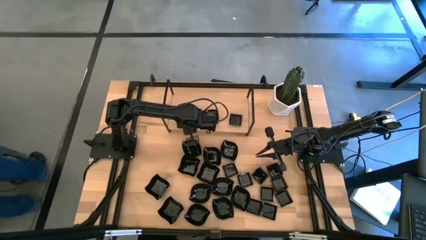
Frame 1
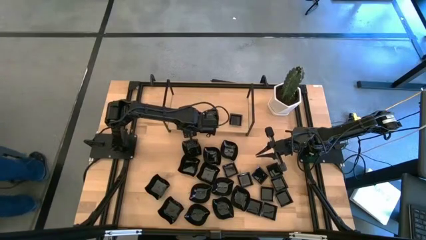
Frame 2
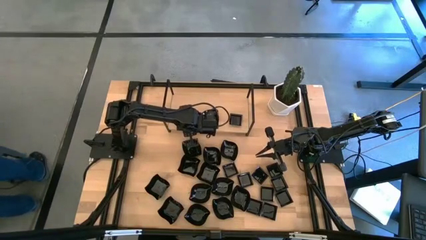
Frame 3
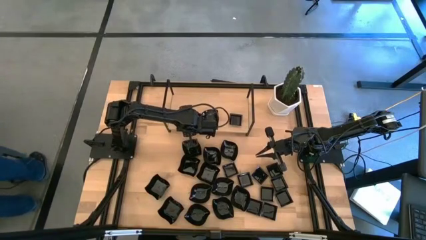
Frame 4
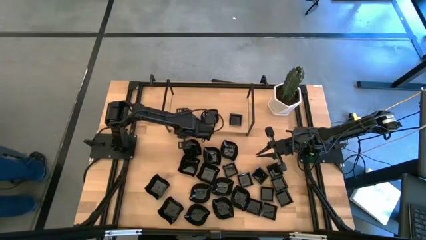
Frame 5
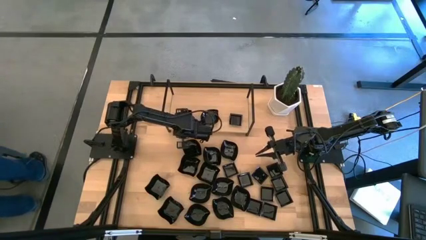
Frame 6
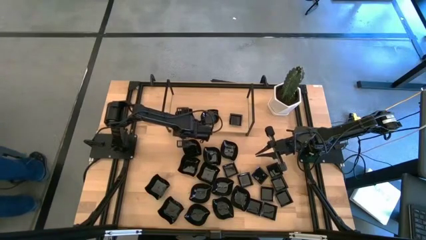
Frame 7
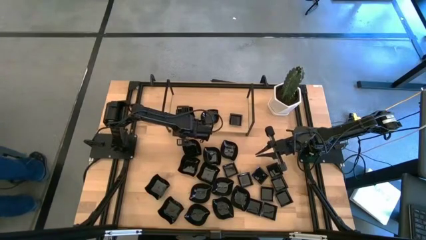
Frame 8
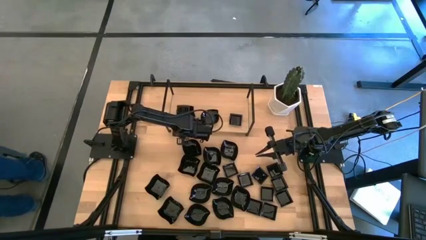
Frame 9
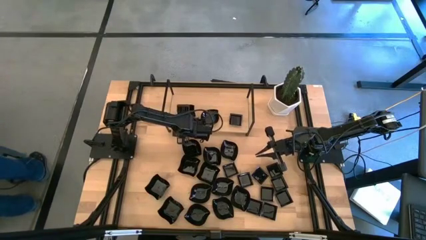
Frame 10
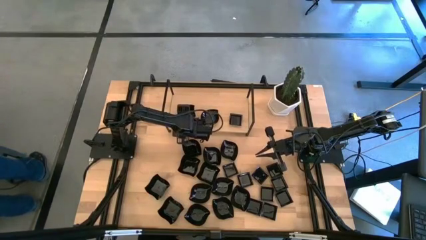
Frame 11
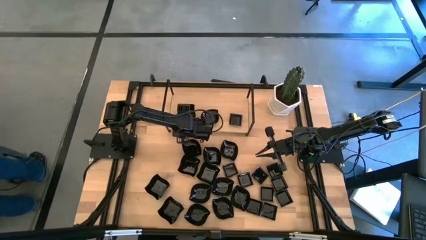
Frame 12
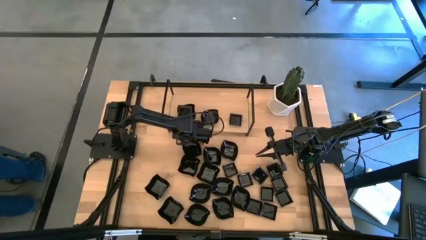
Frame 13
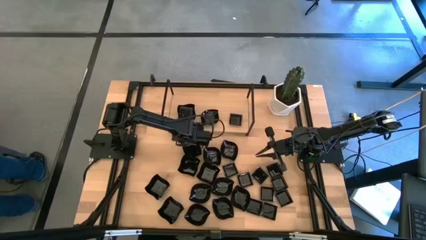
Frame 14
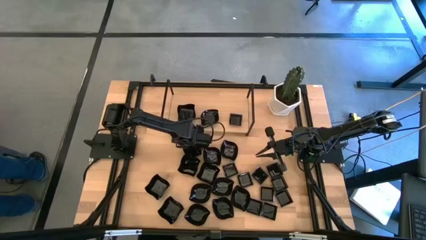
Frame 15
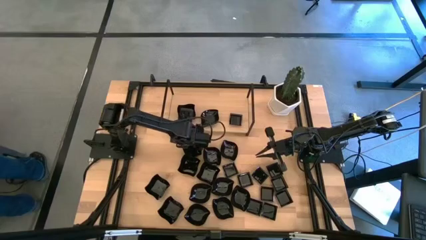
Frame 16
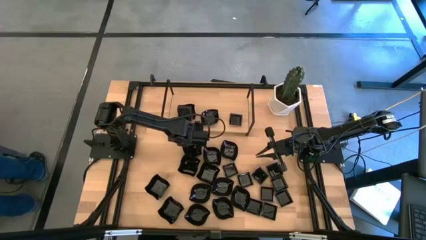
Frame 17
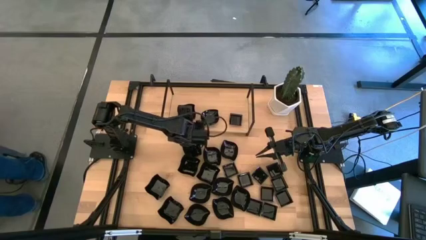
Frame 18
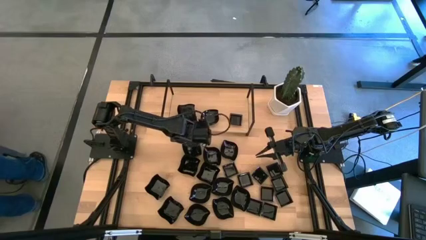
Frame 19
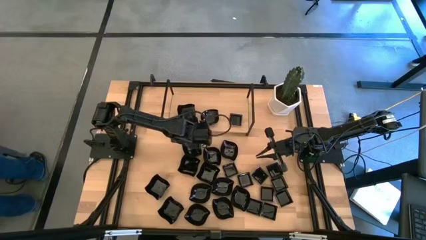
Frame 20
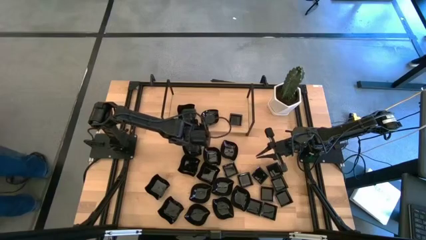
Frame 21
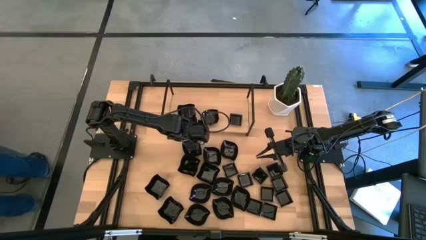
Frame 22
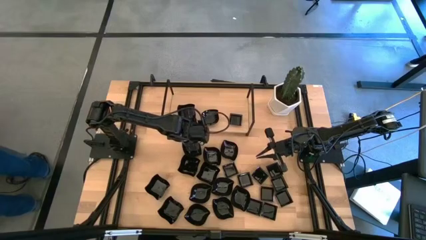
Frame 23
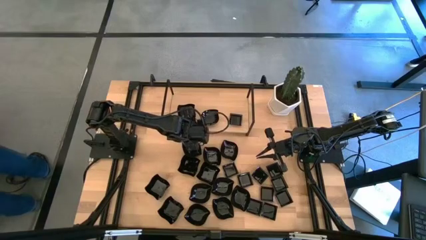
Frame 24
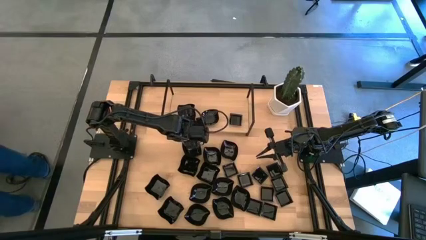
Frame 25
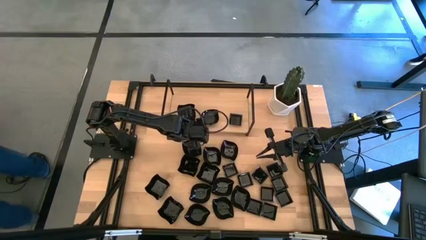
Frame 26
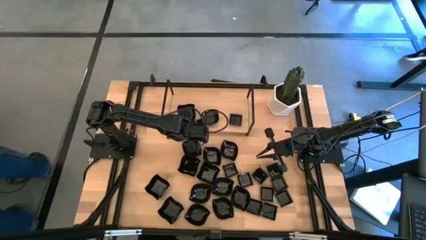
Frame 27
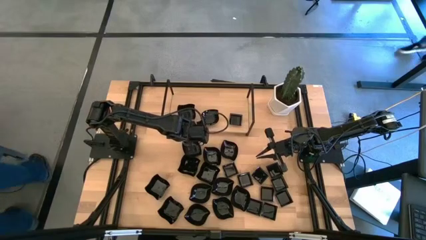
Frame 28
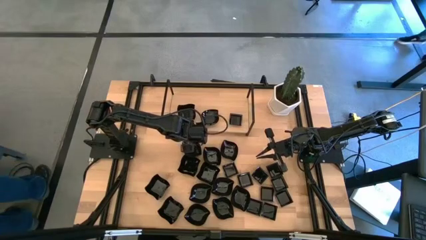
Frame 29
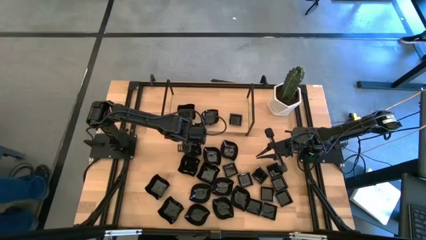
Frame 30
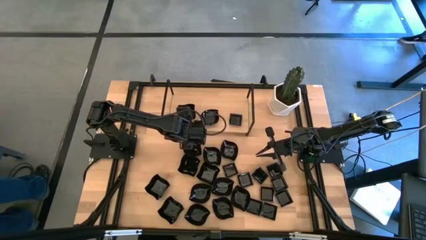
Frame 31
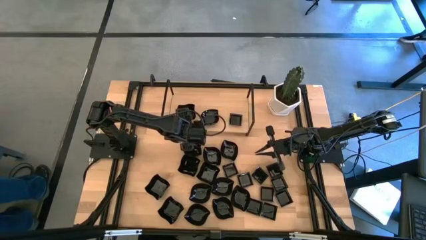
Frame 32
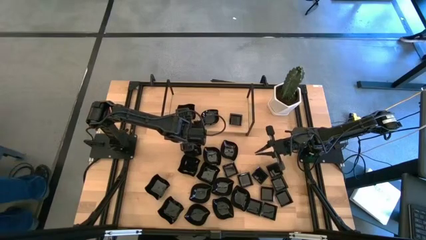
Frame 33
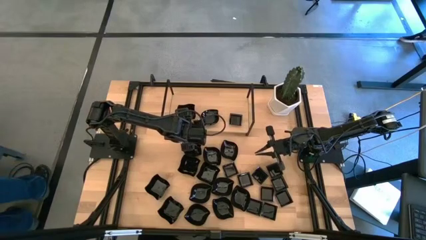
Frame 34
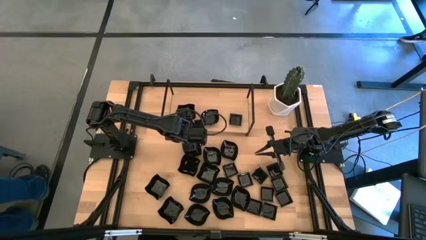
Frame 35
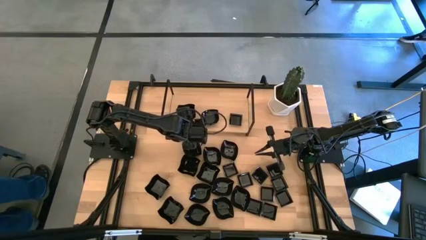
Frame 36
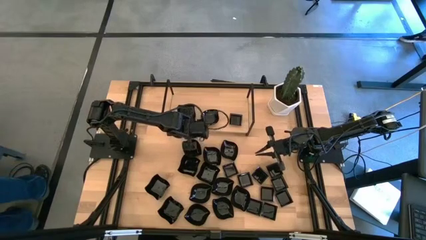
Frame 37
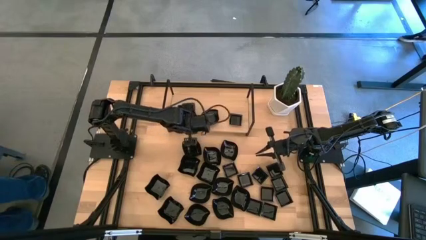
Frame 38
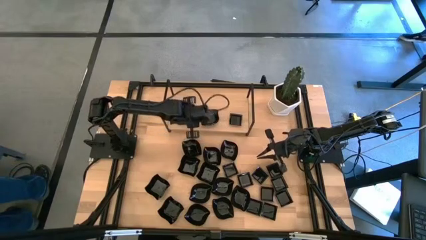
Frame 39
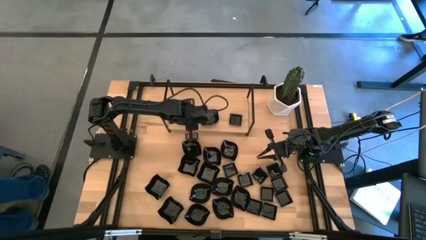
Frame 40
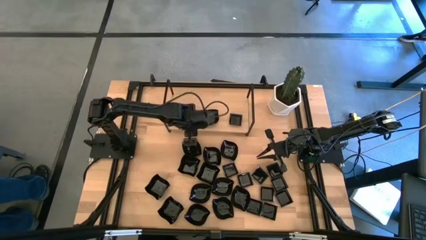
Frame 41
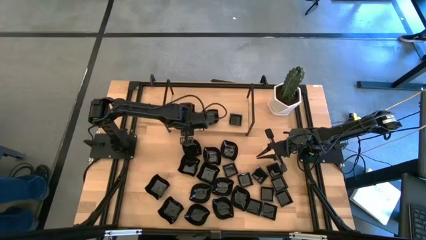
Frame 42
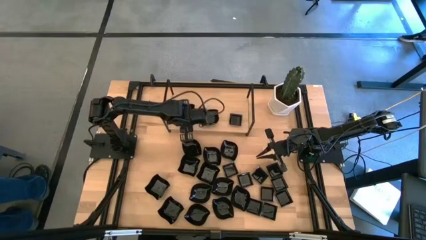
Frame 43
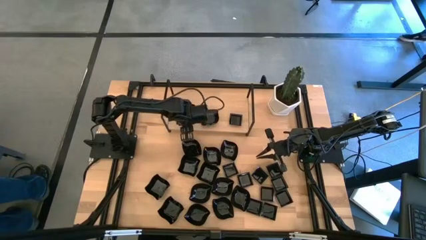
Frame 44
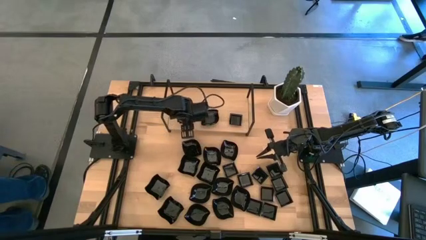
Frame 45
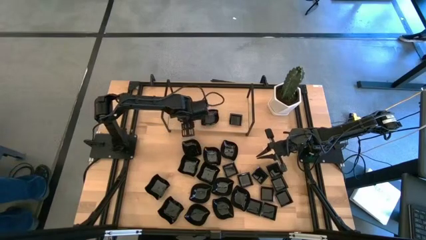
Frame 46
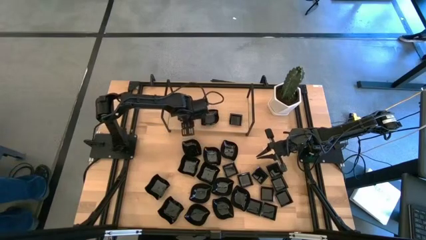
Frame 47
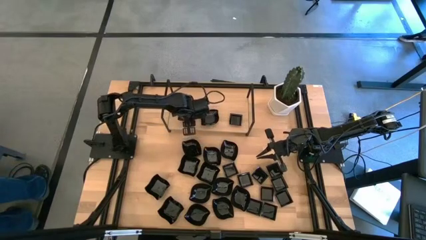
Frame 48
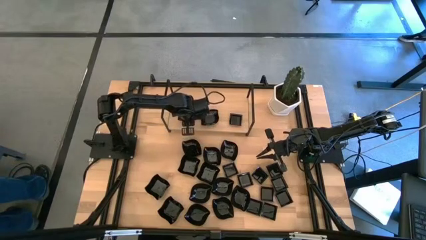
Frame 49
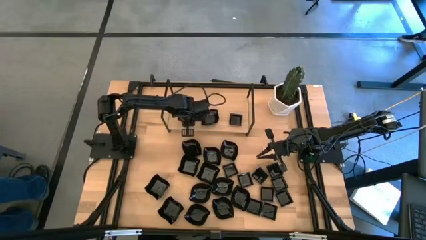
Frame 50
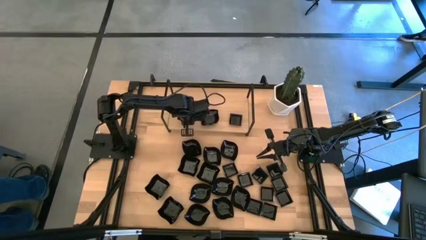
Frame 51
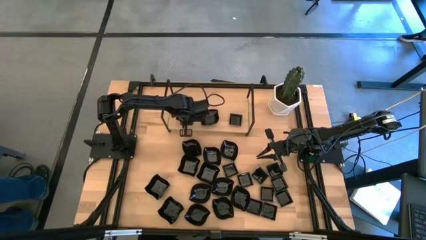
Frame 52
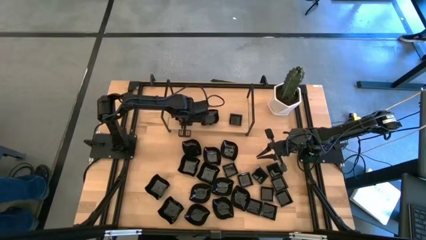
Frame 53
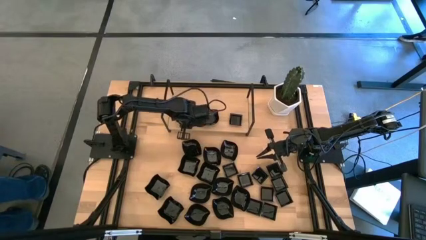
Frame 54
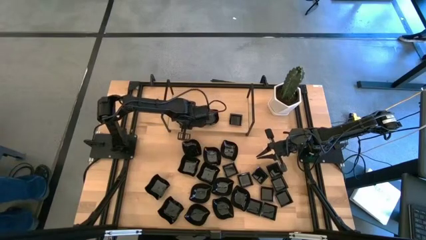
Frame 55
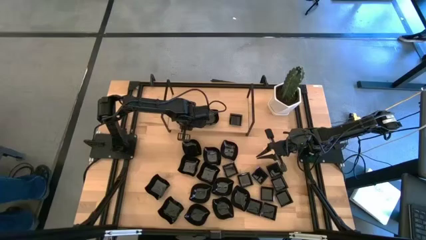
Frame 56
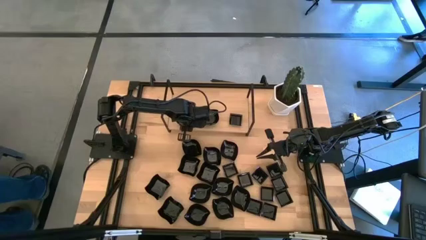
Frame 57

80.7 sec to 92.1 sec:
Task: Pick & Place Mini shaped plates
Adjust the stacked distorted square plates on the shelf

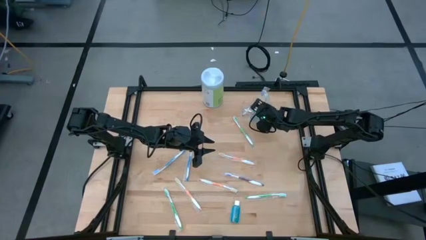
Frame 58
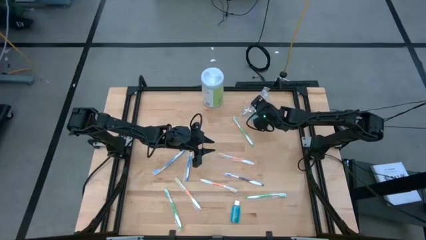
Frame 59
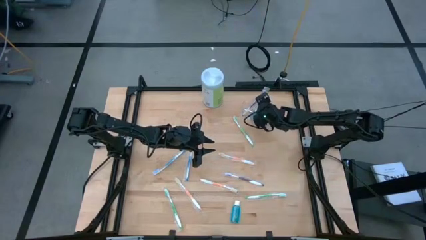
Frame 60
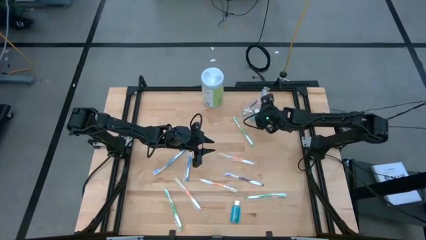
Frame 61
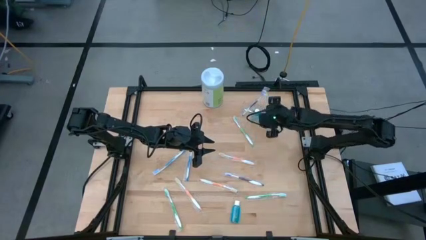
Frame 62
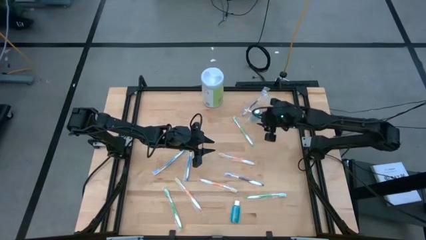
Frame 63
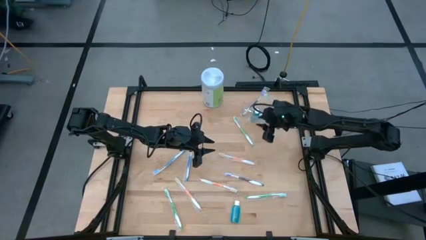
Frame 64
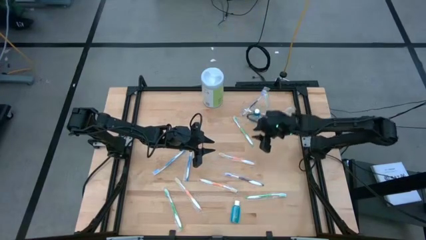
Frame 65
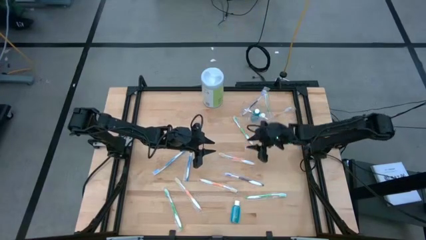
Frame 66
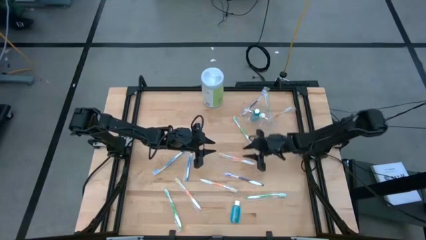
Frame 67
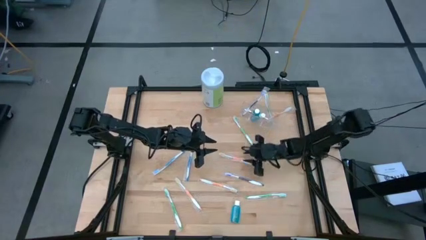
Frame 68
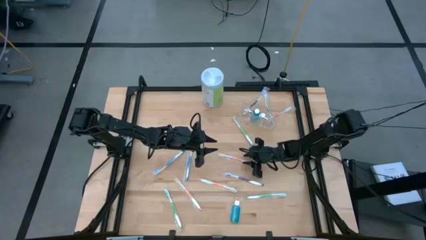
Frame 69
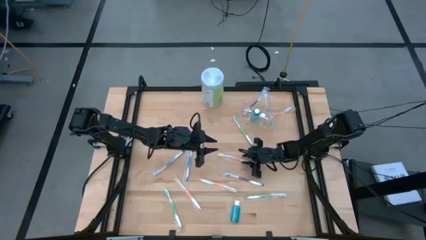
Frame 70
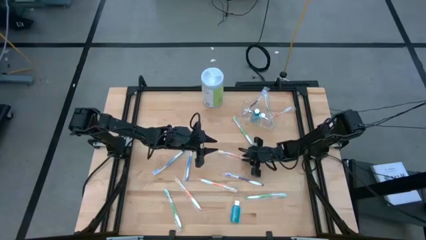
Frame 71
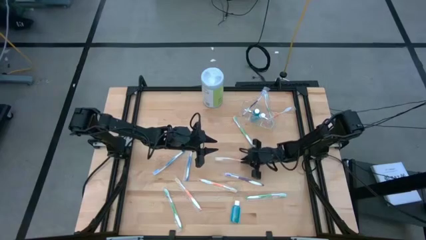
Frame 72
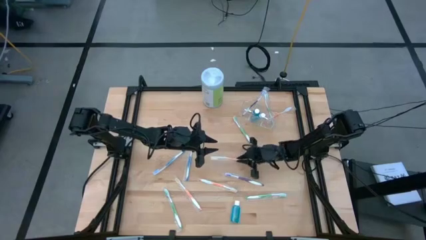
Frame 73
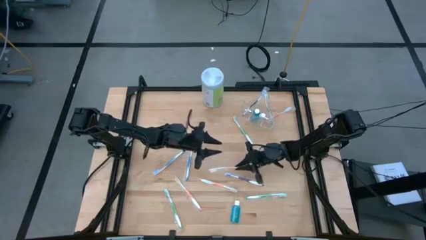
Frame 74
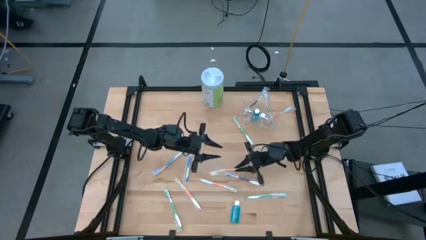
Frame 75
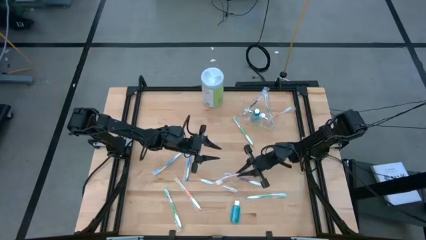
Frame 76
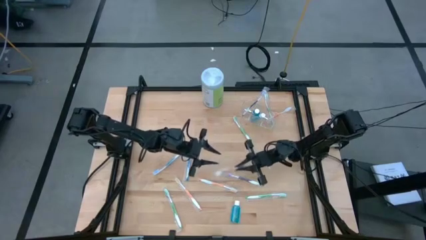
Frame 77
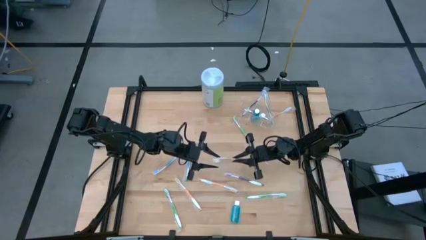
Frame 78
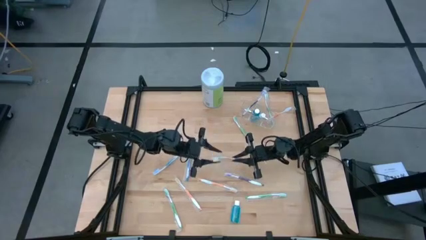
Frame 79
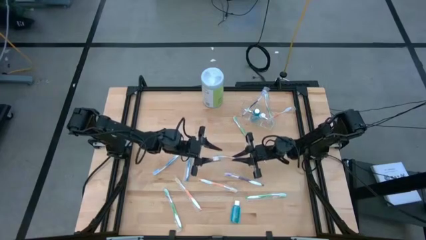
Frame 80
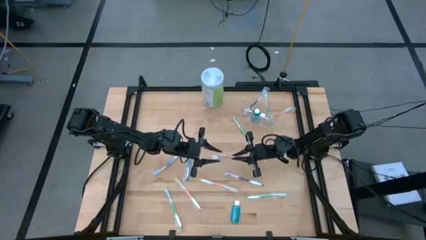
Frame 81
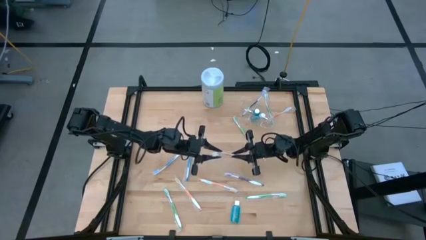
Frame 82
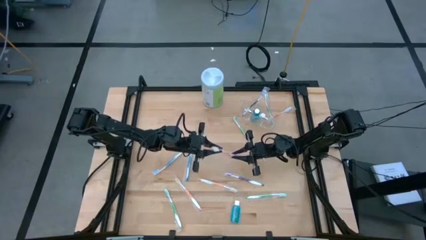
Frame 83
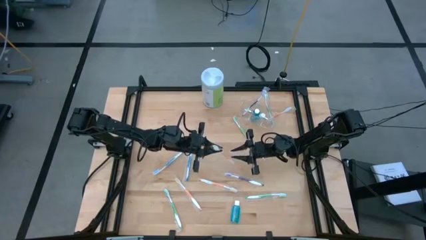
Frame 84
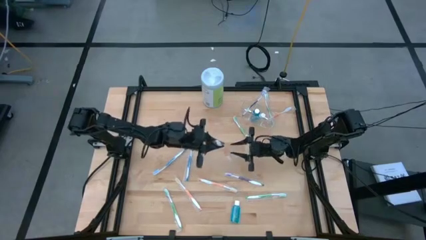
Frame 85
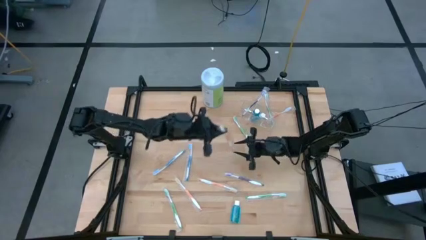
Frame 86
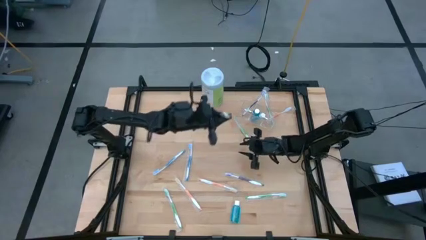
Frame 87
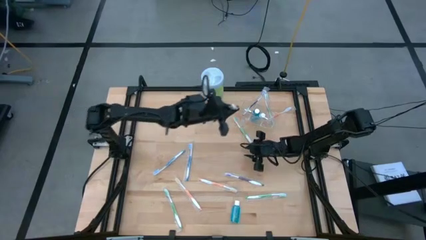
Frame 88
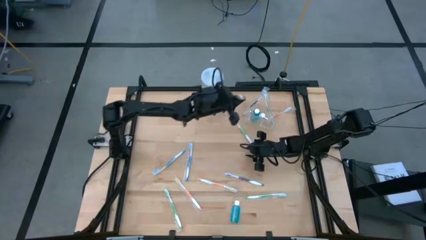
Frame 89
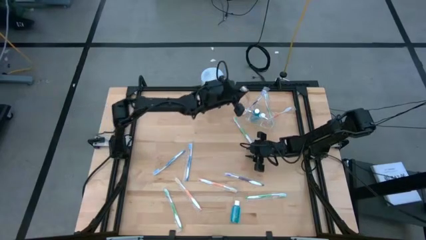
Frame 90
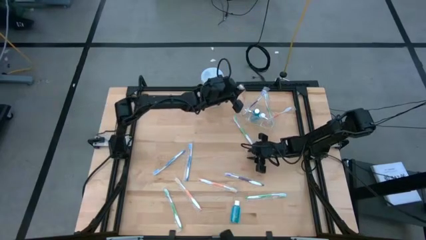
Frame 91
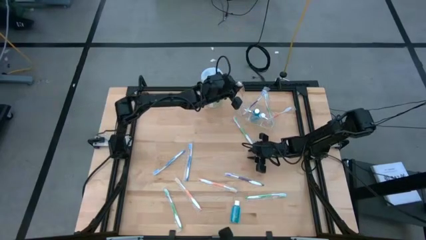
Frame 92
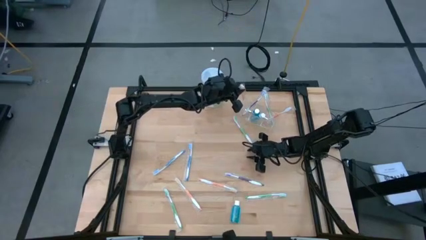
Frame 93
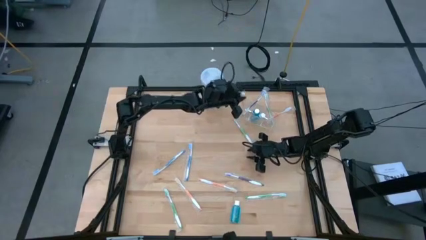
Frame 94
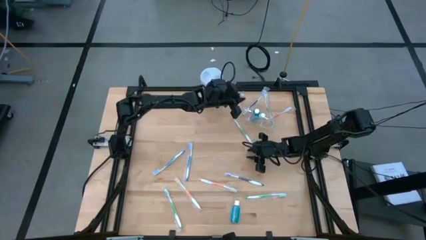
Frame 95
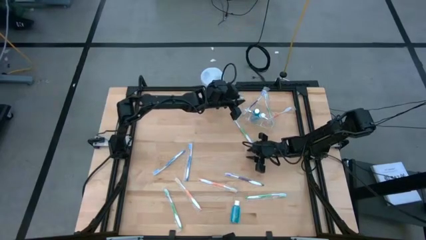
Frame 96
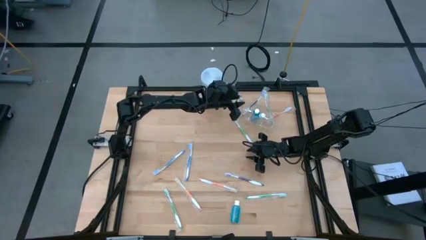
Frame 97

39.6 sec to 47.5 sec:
Task: Pick & Place toothbrushing station
Put the orange toothbrush into the transparent organizer
